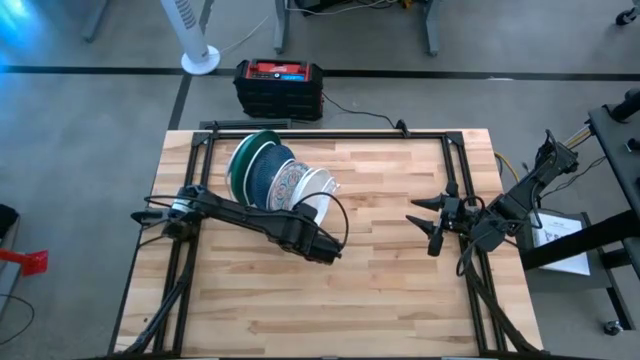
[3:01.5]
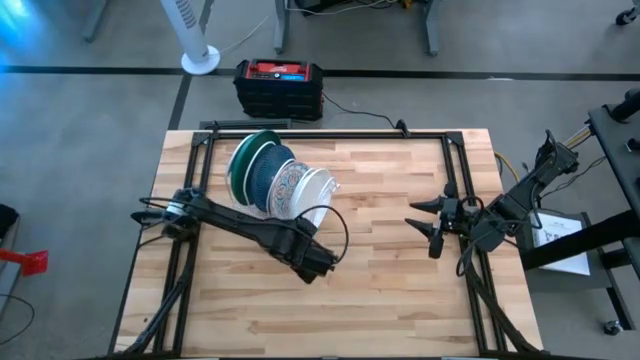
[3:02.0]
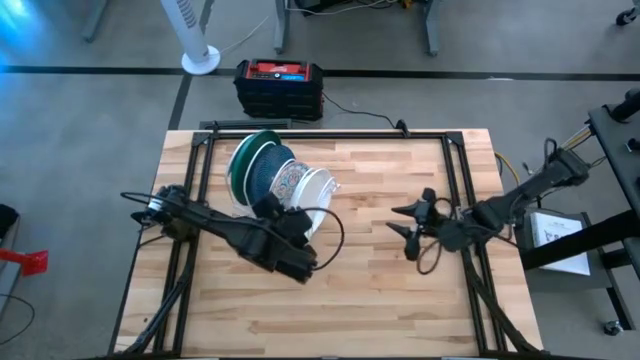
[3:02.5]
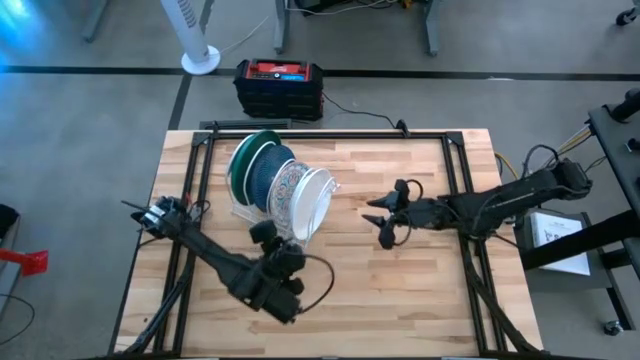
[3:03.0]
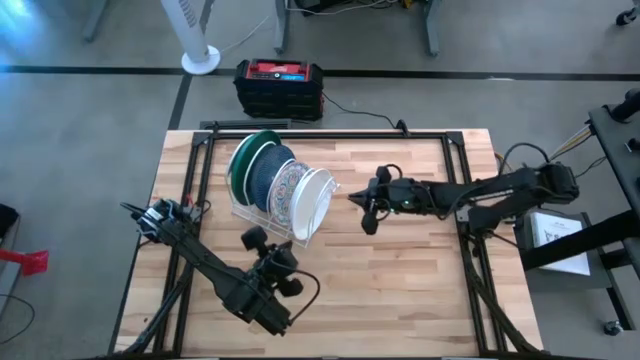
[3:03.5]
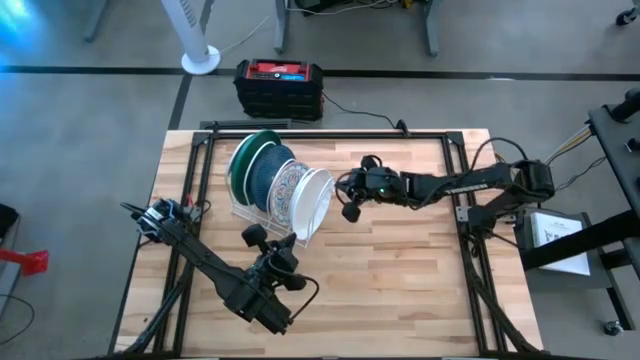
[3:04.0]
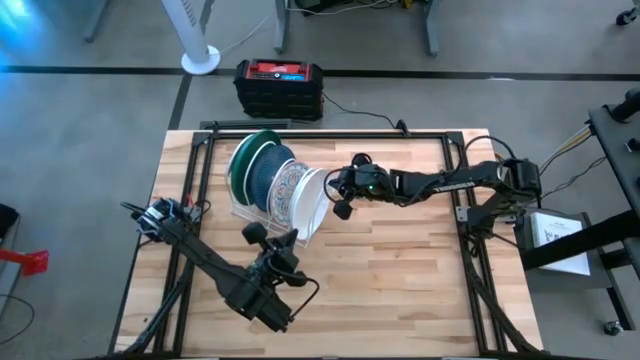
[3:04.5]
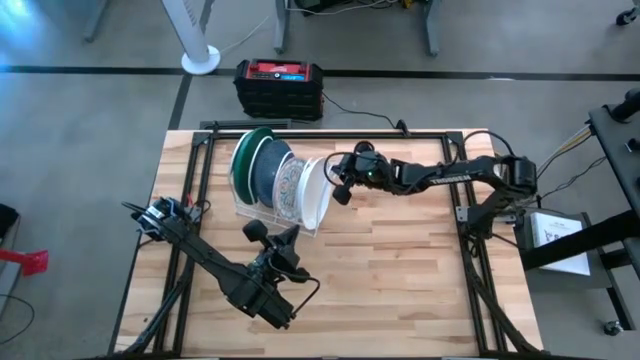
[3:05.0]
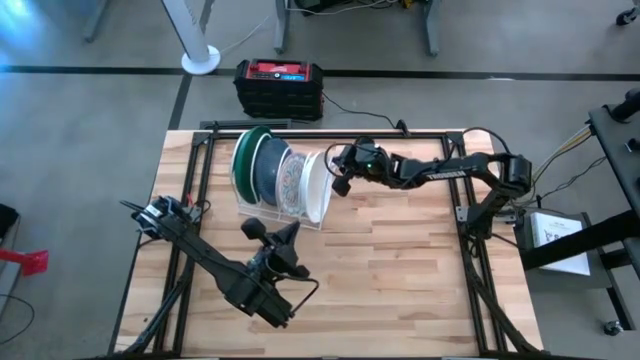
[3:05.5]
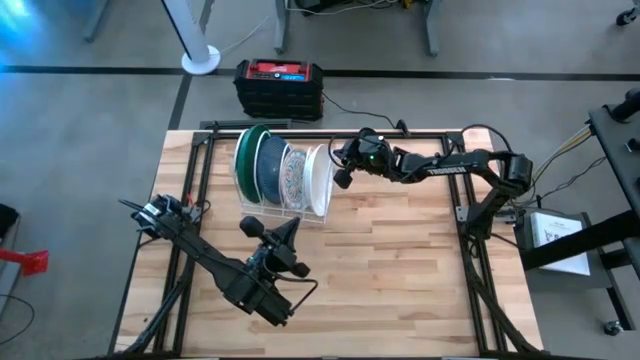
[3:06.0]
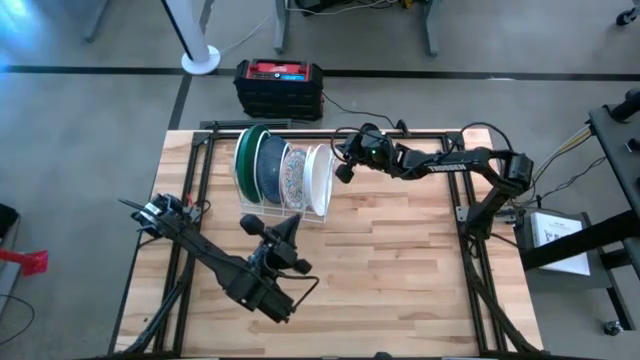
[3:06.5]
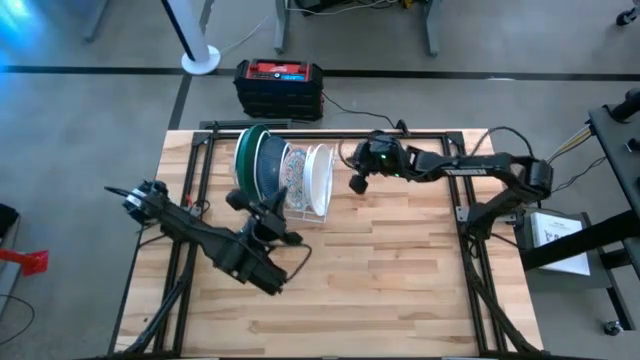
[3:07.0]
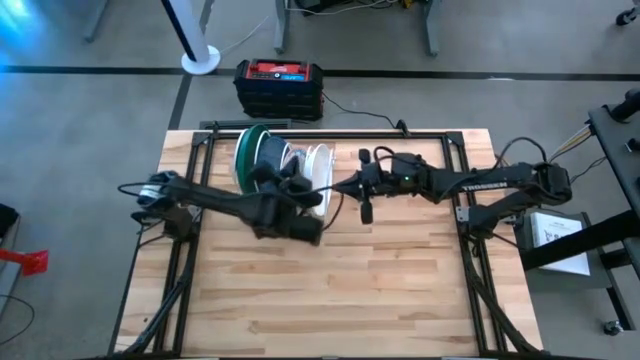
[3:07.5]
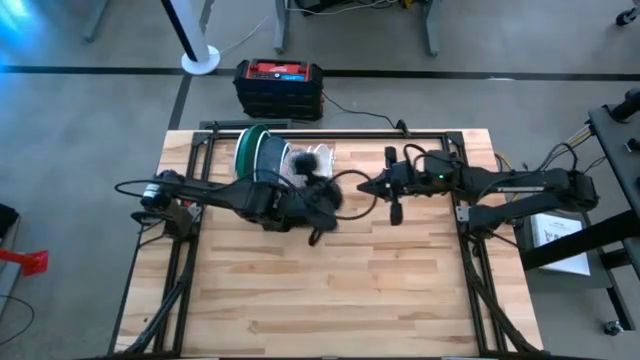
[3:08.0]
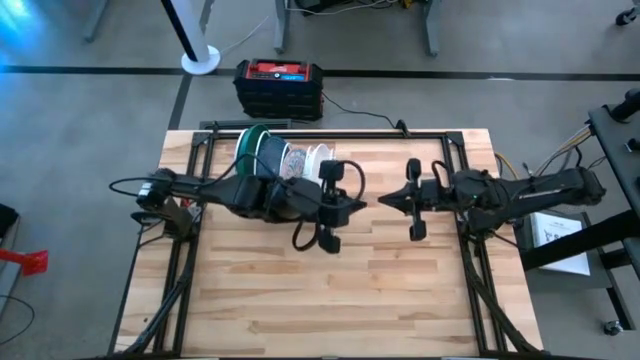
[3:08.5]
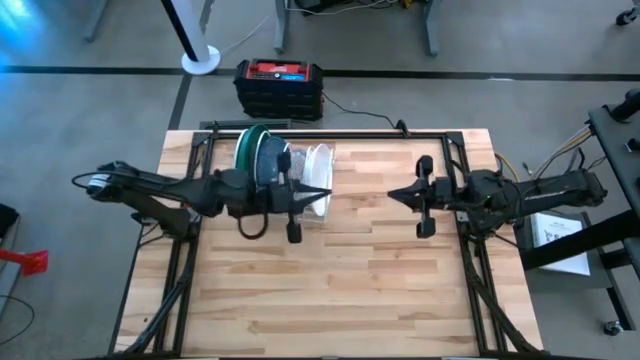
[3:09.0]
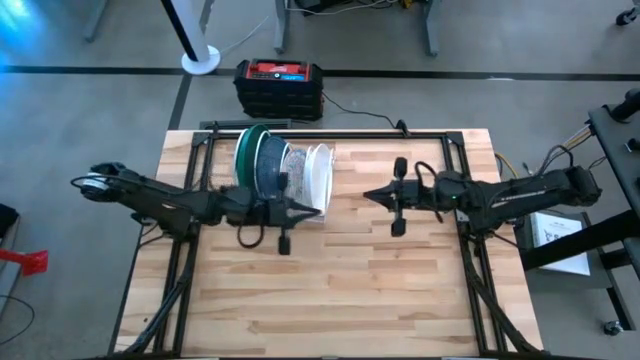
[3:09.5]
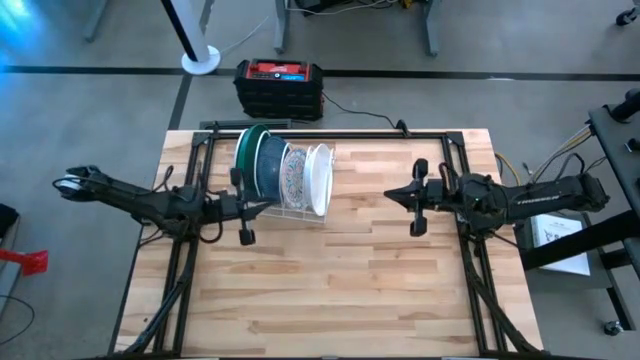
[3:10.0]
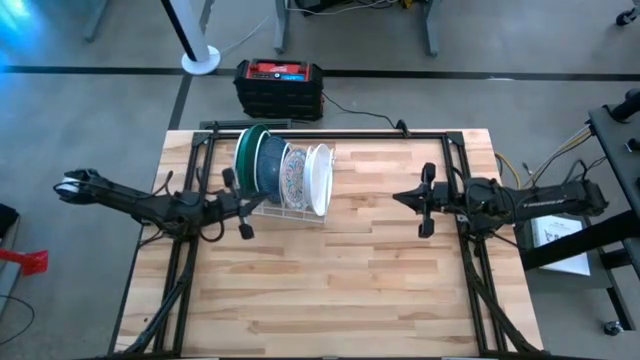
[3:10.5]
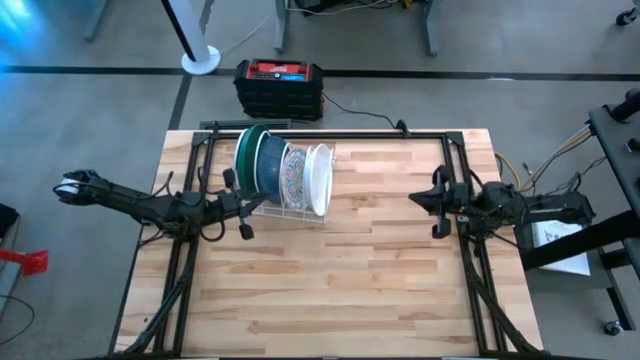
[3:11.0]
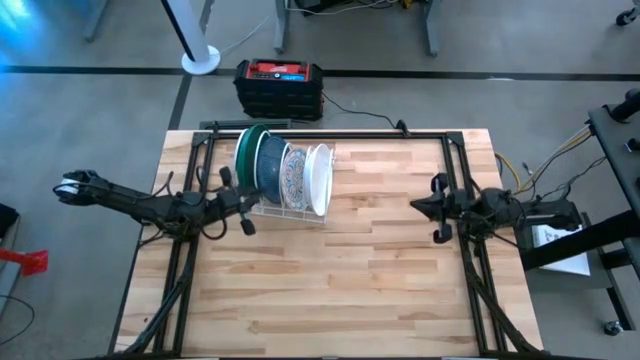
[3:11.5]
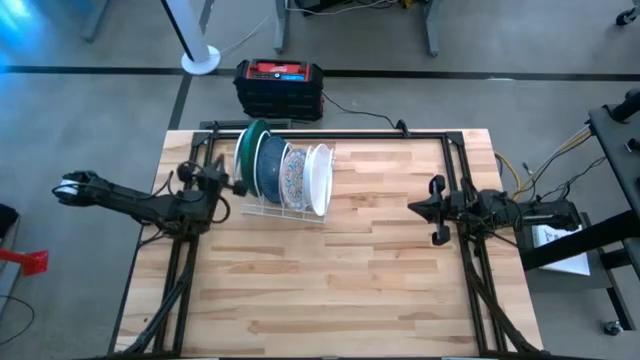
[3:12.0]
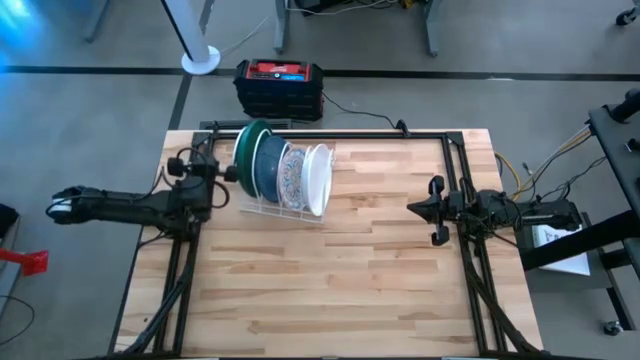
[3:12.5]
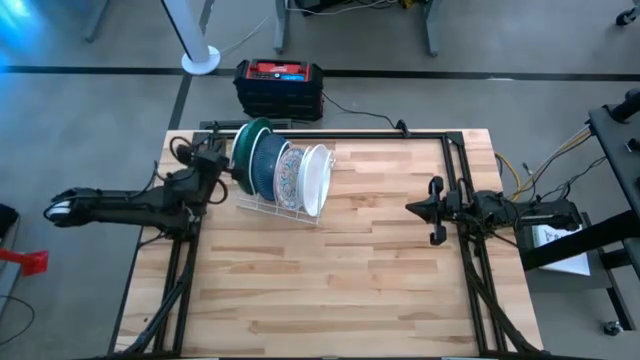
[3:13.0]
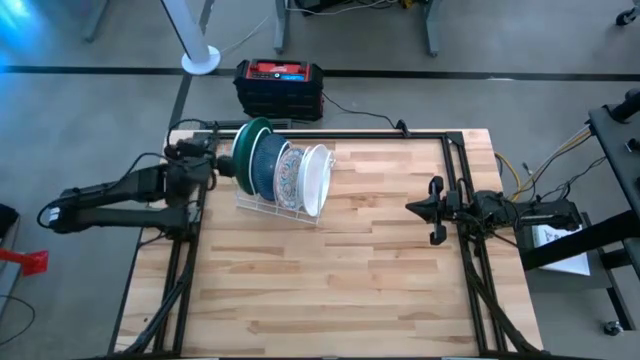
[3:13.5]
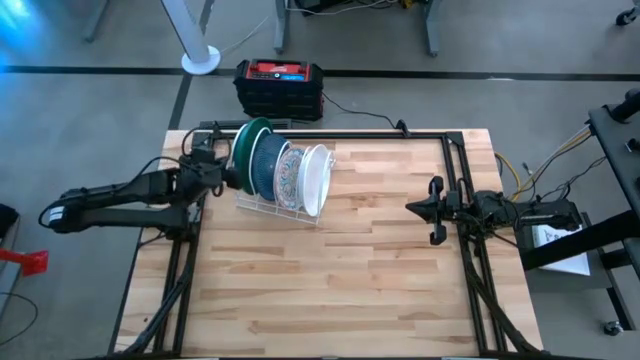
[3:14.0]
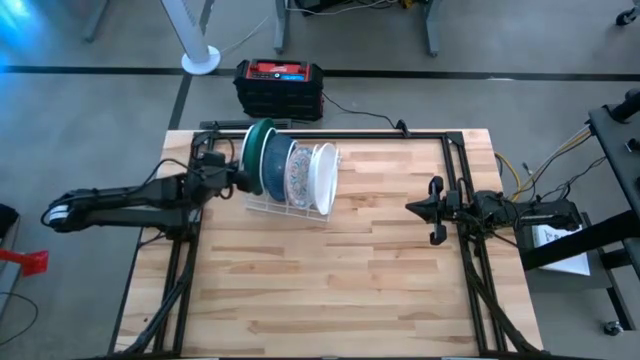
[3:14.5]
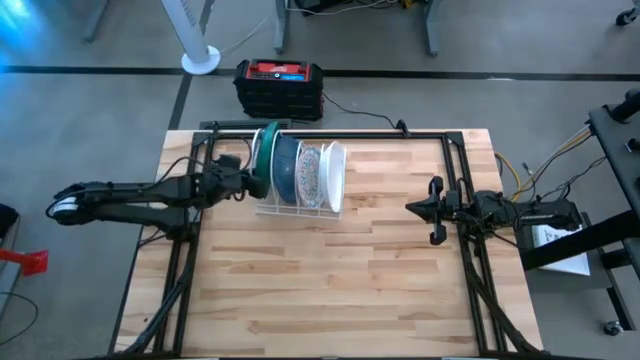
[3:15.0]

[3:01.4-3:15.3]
Task: Sort dishes
Move the dish rack

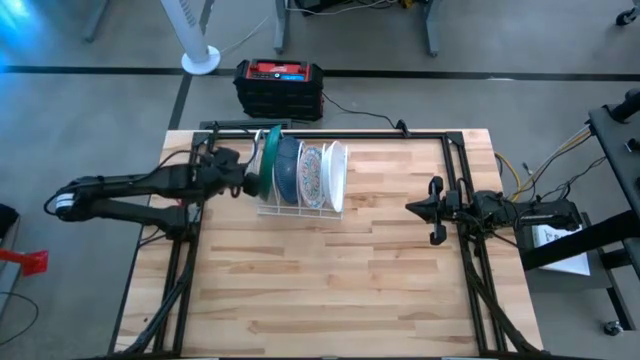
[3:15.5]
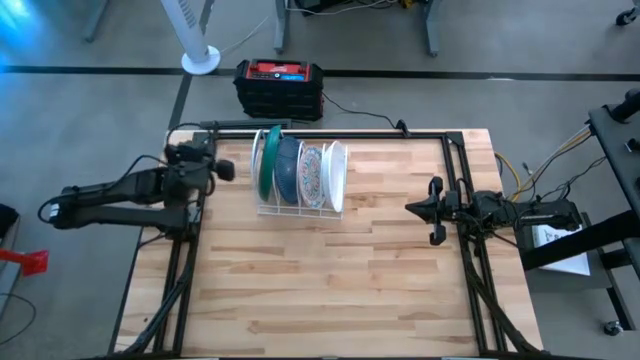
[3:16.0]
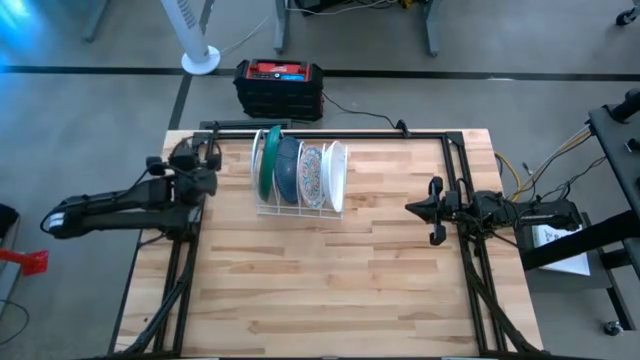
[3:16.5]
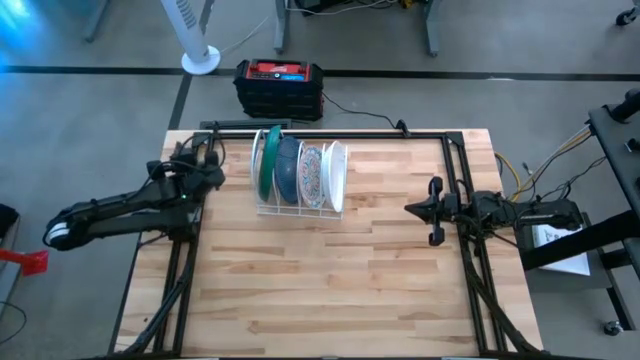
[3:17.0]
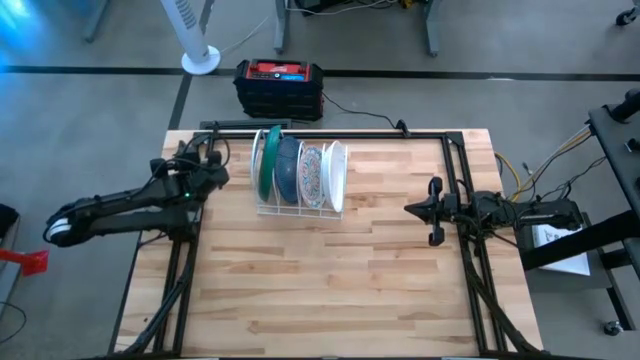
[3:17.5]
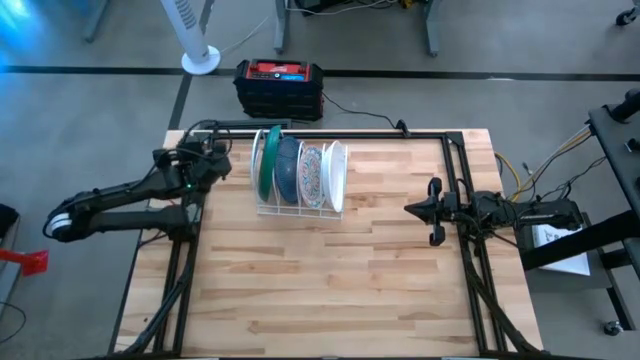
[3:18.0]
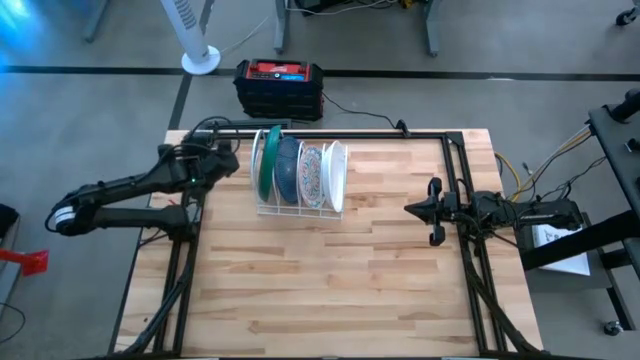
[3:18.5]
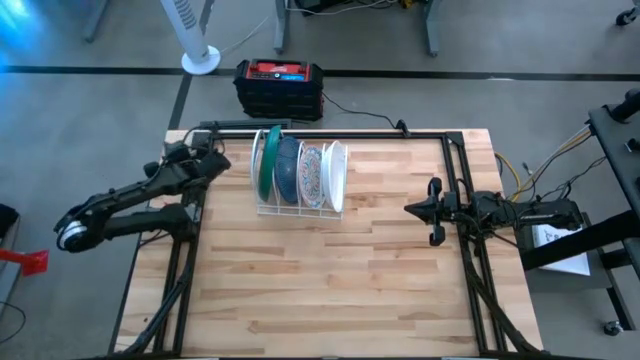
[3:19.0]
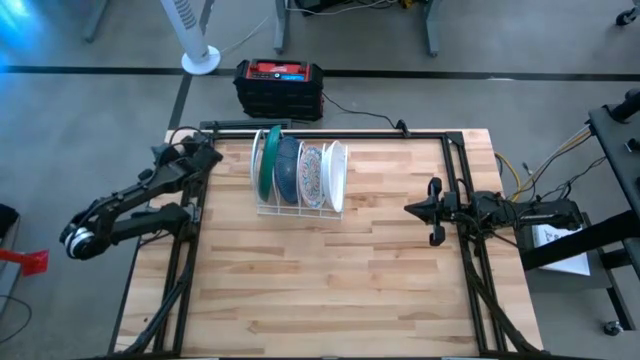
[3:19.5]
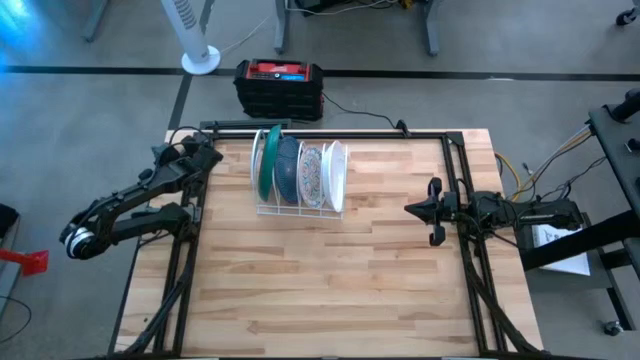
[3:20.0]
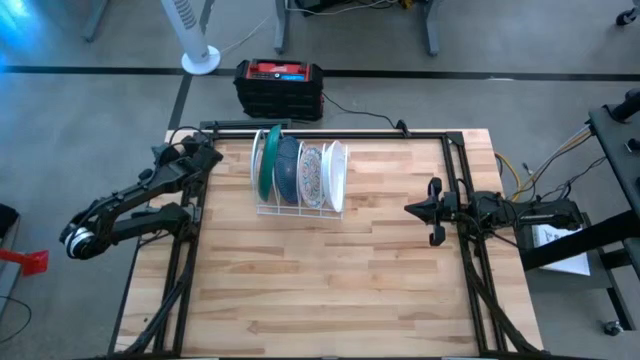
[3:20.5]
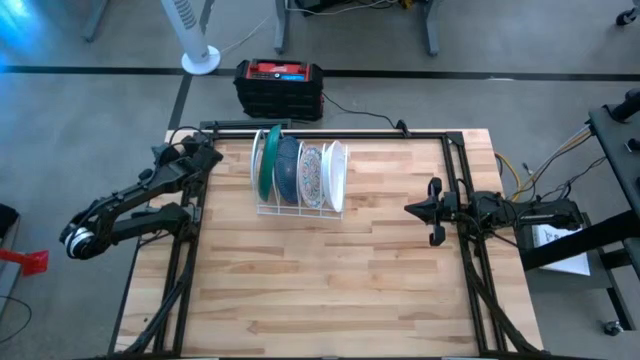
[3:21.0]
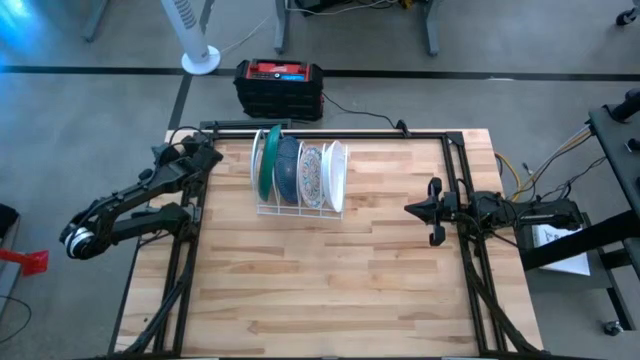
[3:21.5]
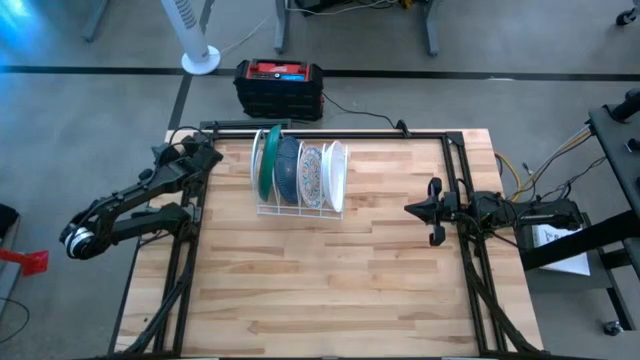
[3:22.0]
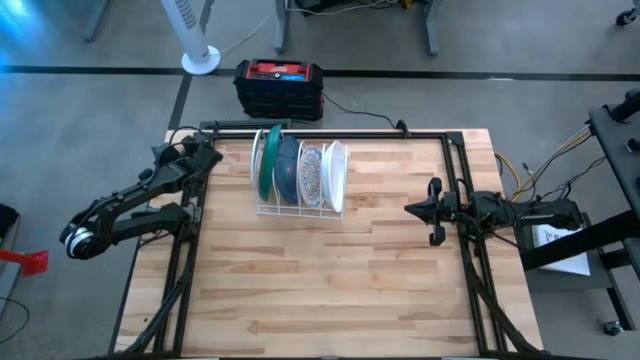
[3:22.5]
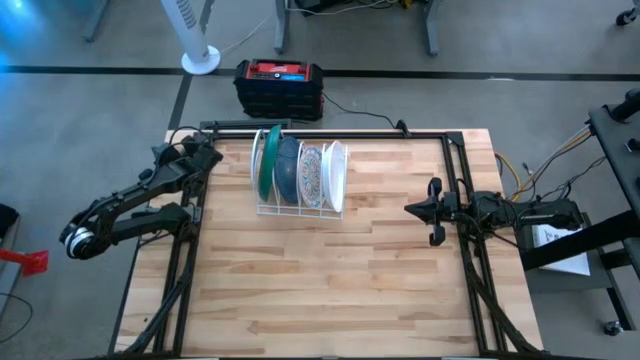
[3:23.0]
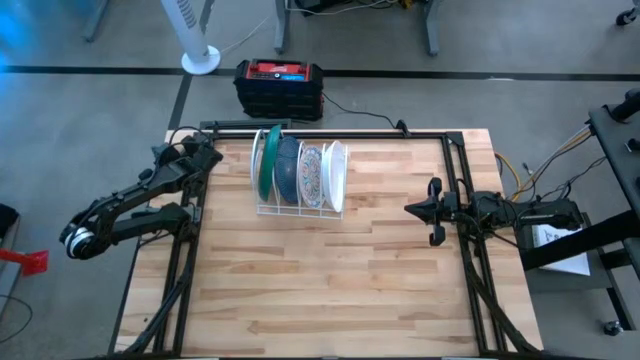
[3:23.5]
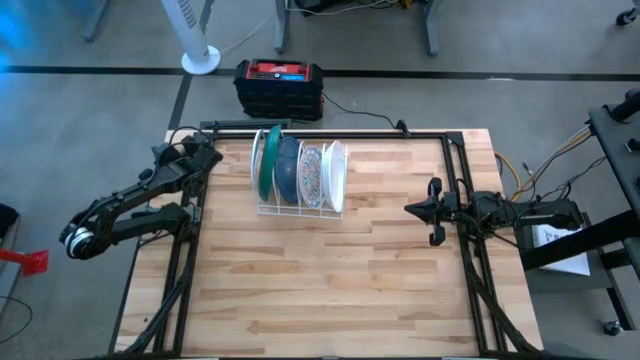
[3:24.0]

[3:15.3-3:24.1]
Return to Home Position
